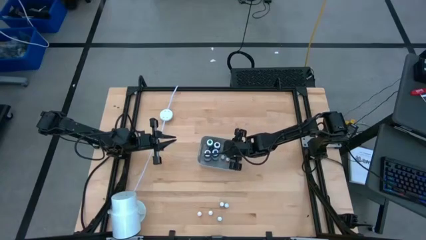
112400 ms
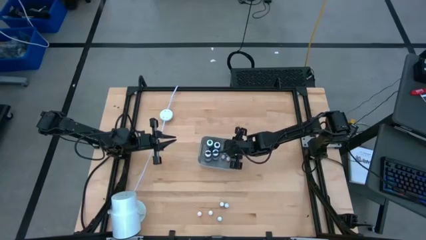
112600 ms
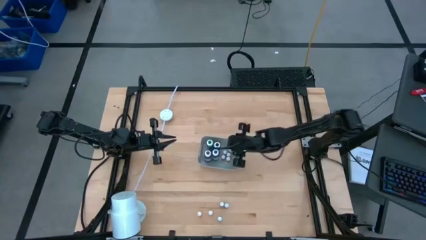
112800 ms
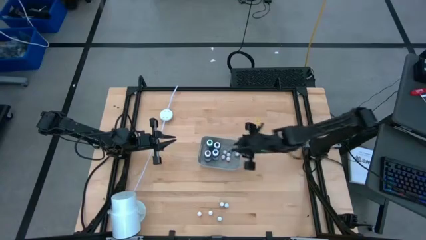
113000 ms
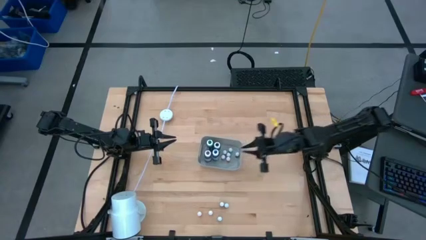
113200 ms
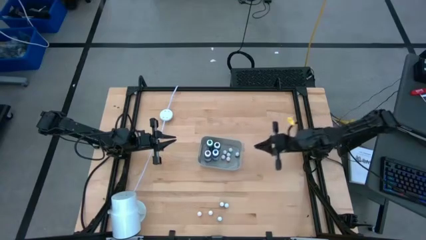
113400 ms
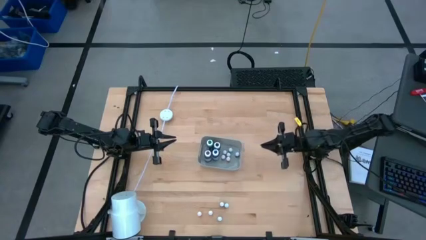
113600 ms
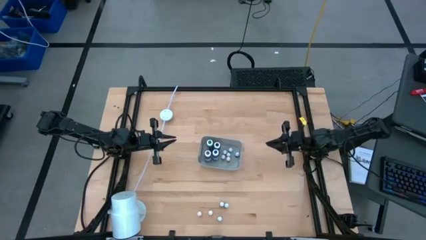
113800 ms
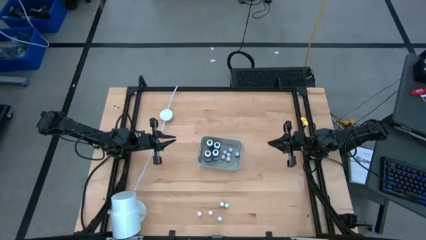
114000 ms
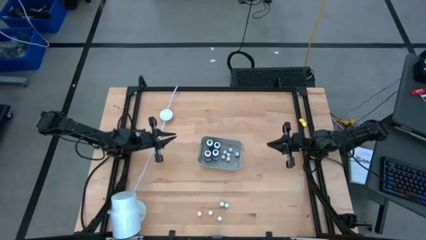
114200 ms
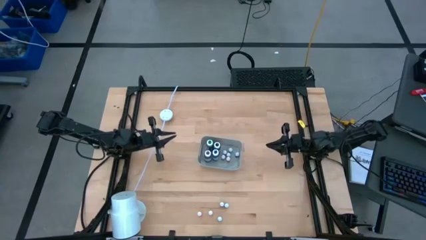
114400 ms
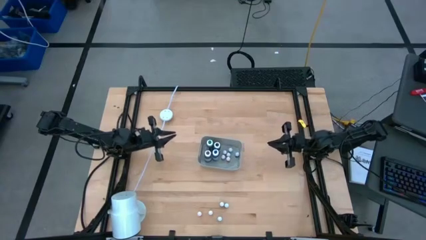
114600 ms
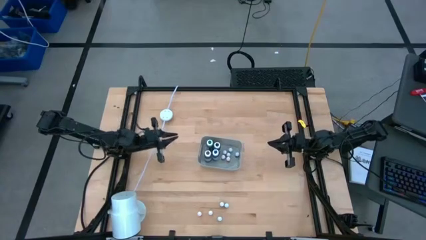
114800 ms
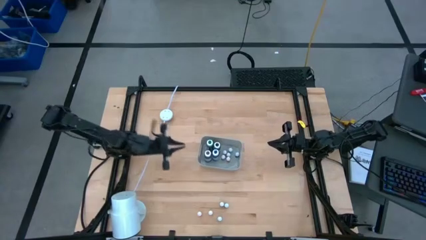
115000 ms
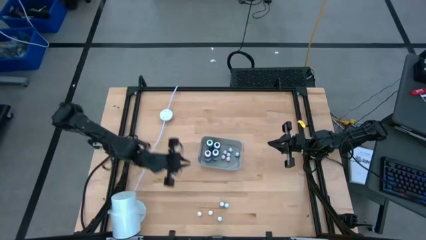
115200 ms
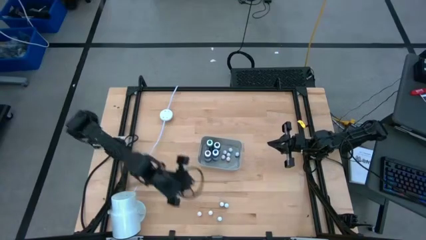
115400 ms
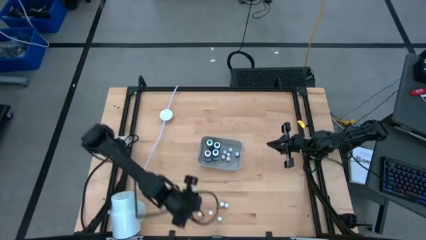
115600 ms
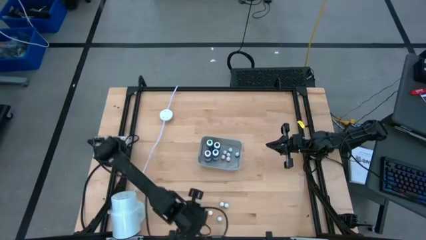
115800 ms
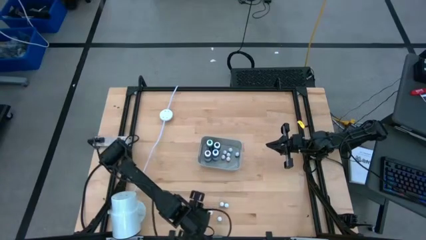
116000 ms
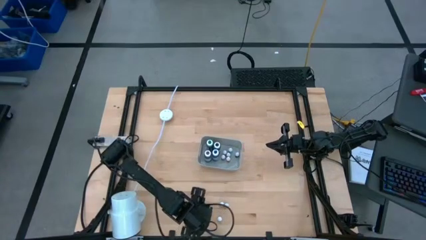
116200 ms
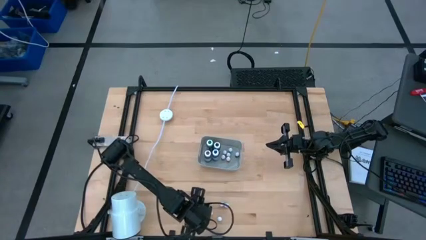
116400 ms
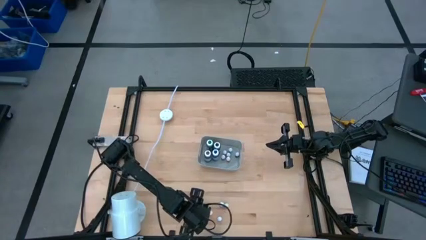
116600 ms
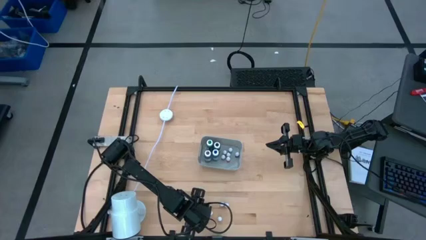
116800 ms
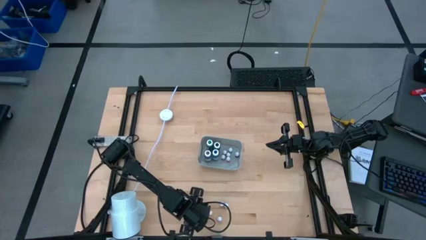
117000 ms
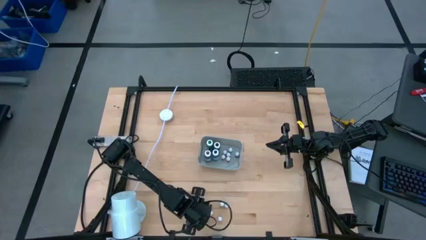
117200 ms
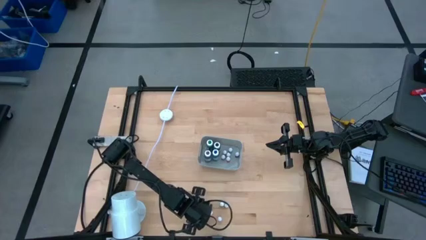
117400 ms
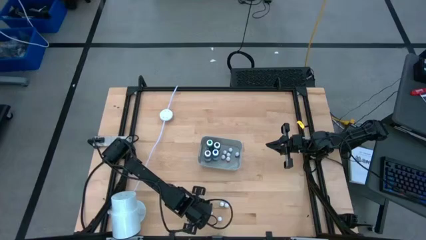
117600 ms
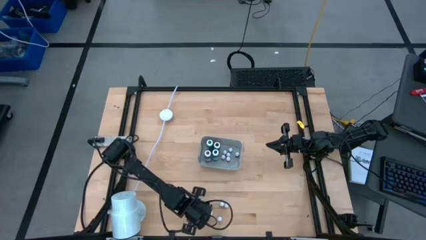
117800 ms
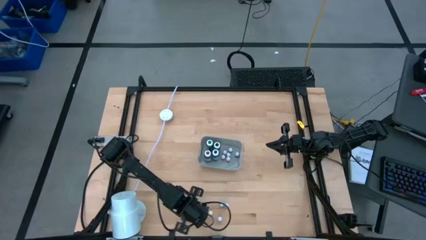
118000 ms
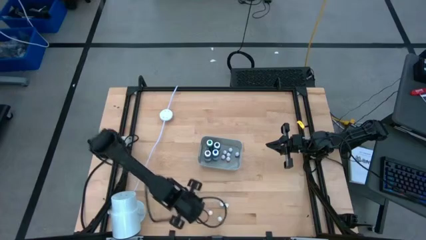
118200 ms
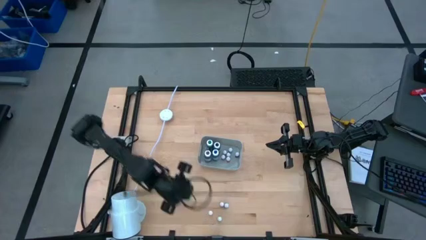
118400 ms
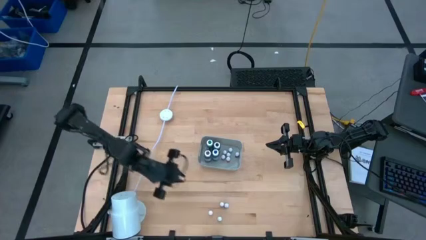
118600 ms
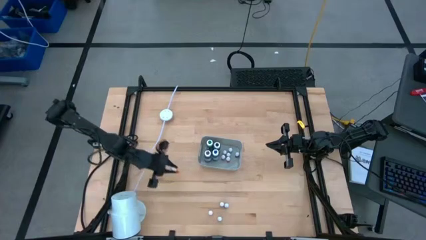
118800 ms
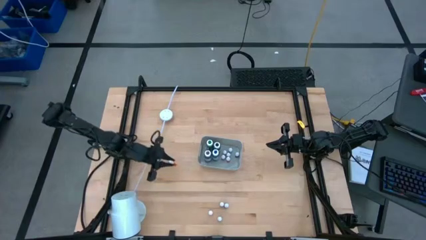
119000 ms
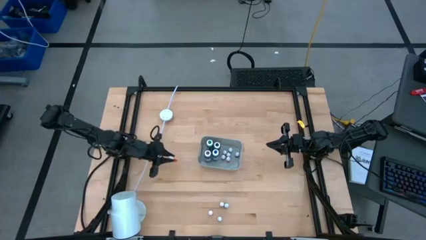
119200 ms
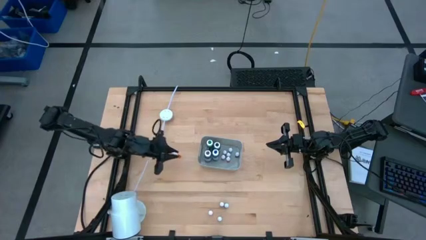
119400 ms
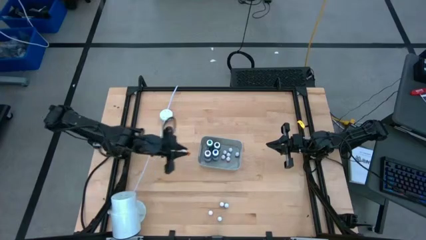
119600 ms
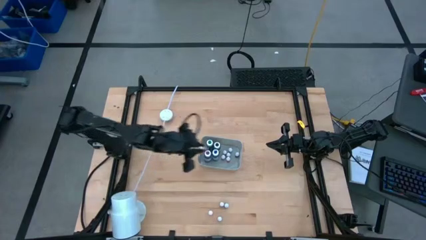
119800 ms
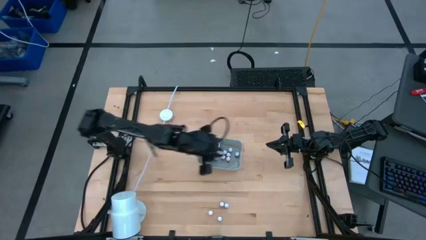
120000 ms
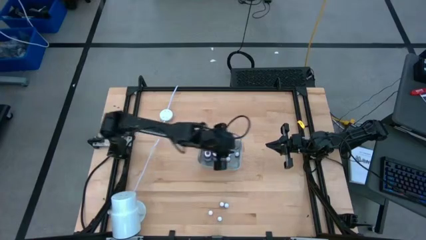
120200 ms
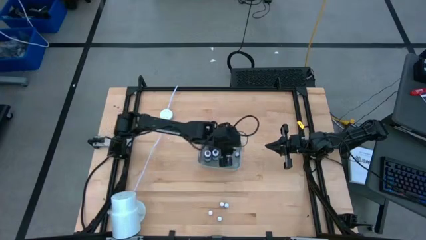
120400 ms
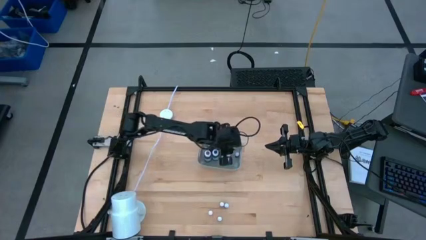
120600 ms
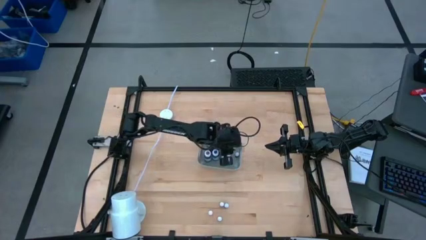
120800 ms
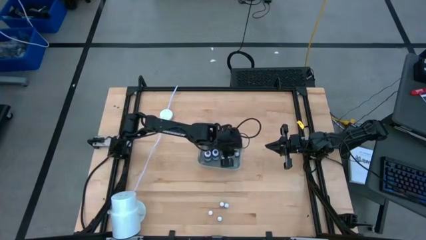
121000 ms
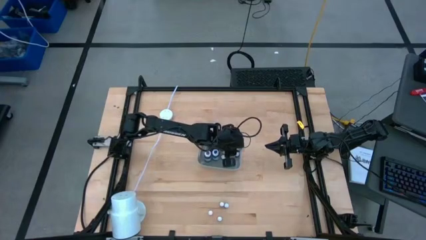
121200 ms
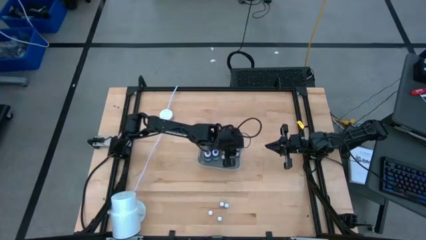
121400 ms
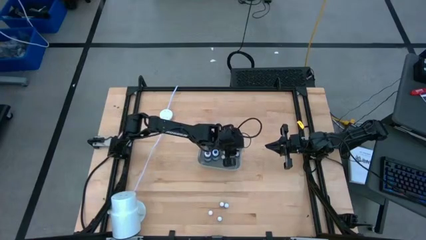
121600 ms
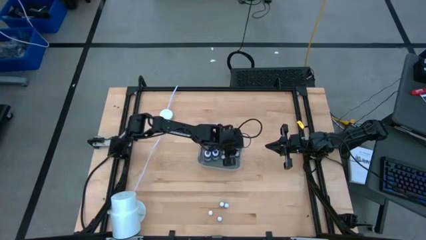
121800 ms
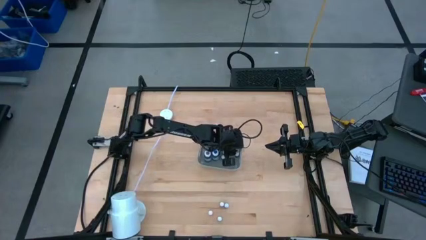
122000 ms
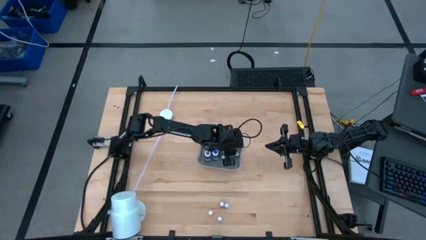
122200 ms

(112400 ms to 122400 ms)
Task: Pick & Place food coloring
Put the small orange food coloring bottle into the gray container

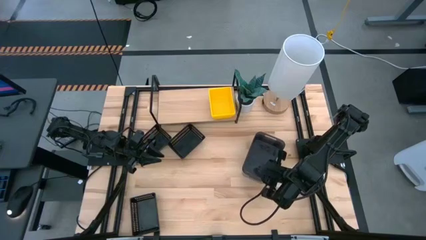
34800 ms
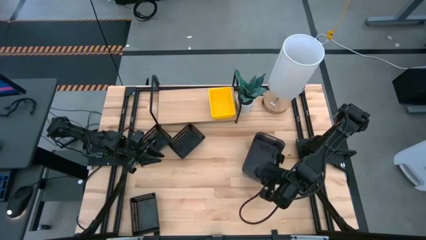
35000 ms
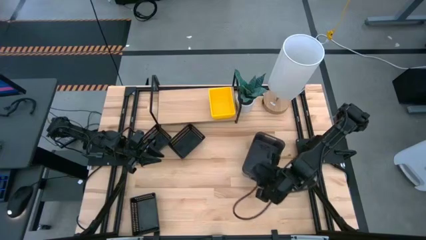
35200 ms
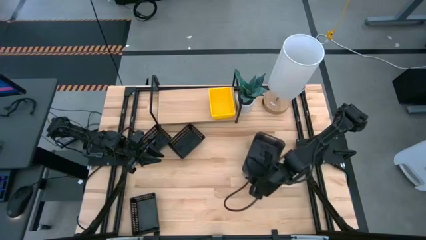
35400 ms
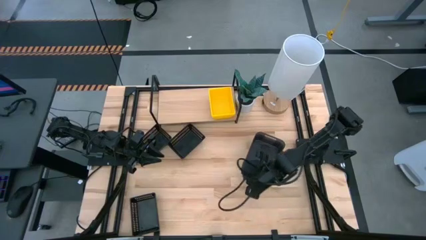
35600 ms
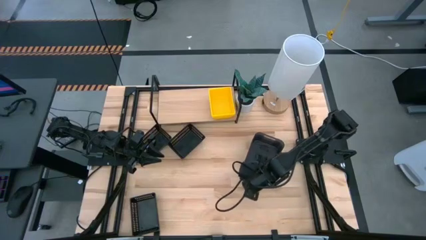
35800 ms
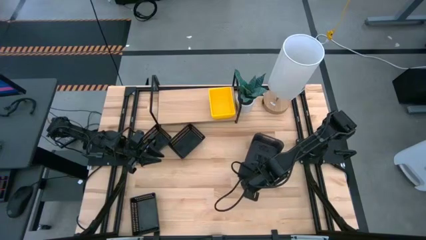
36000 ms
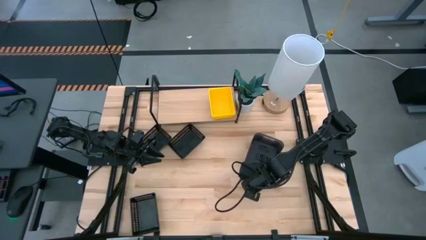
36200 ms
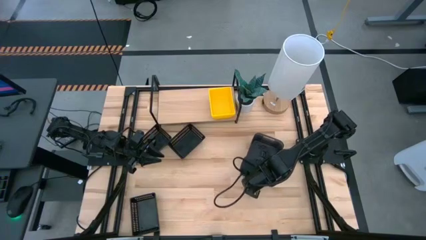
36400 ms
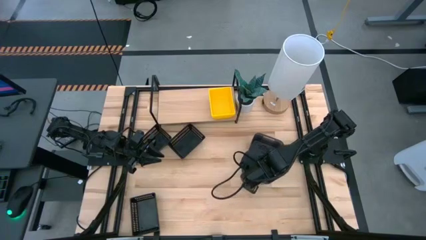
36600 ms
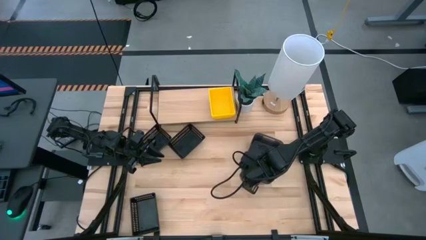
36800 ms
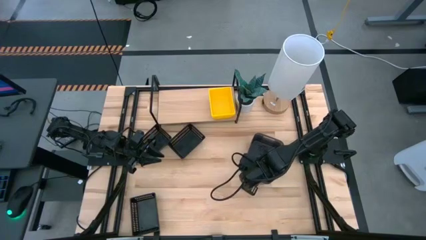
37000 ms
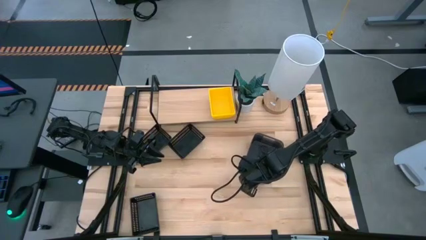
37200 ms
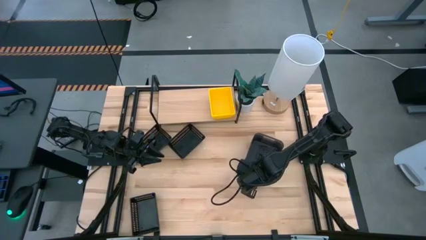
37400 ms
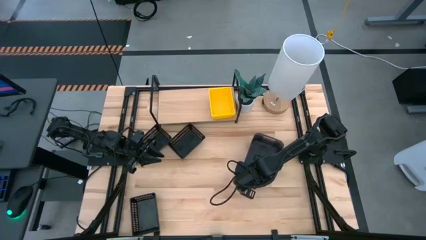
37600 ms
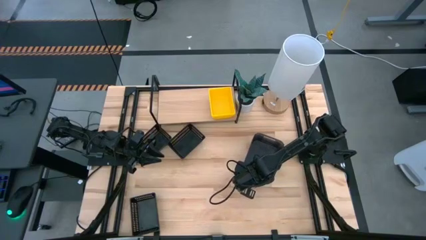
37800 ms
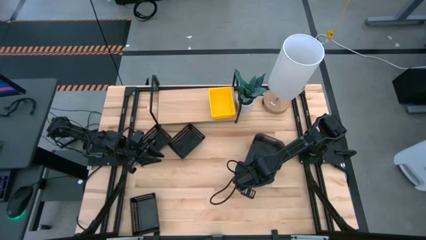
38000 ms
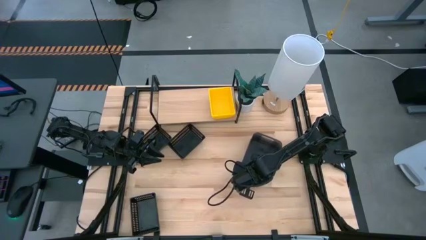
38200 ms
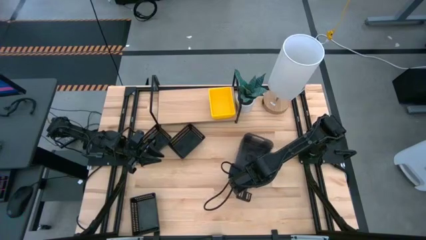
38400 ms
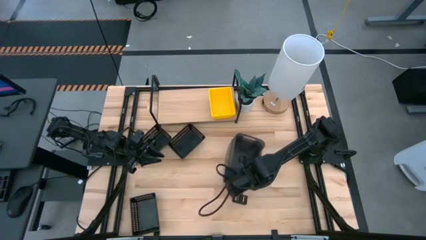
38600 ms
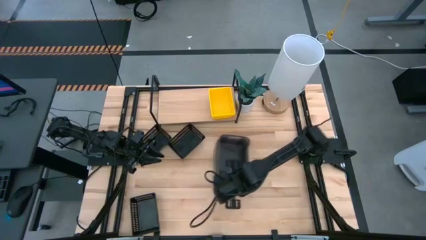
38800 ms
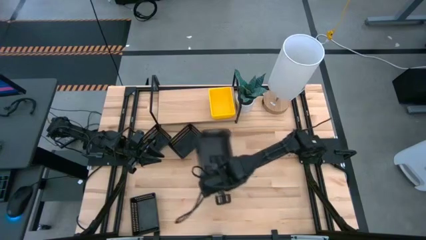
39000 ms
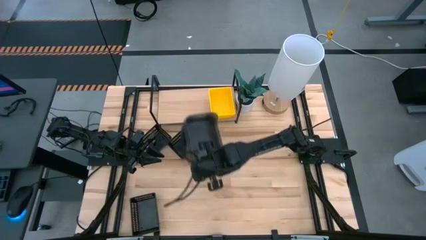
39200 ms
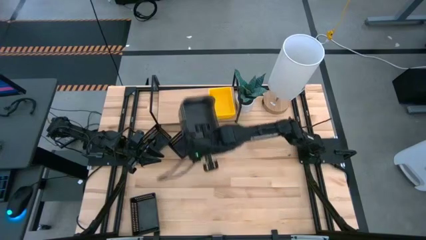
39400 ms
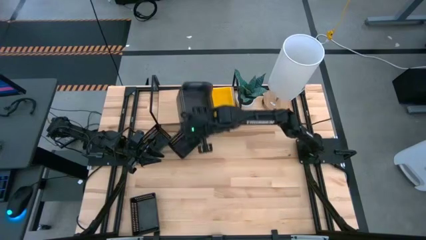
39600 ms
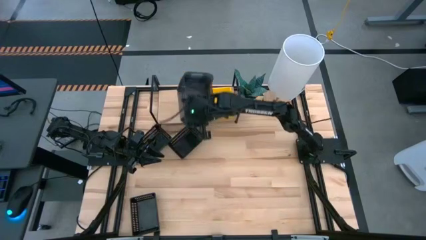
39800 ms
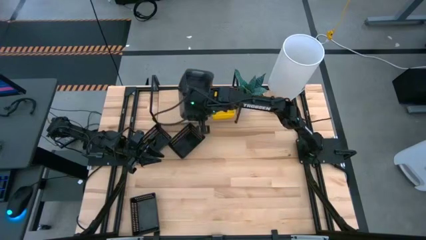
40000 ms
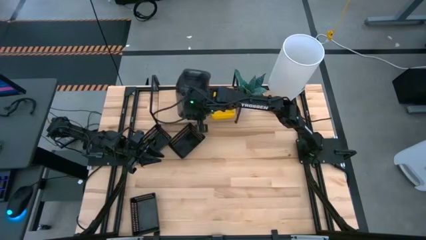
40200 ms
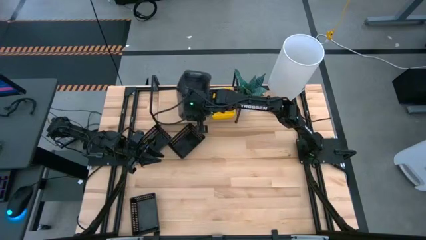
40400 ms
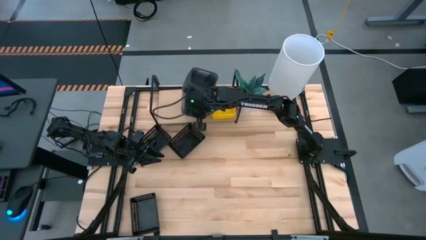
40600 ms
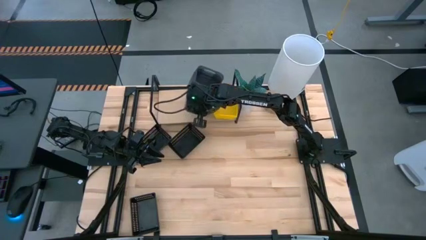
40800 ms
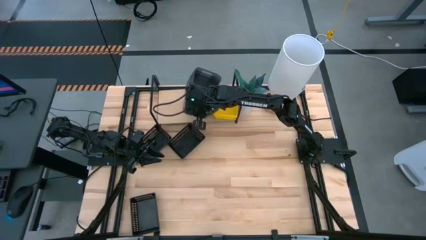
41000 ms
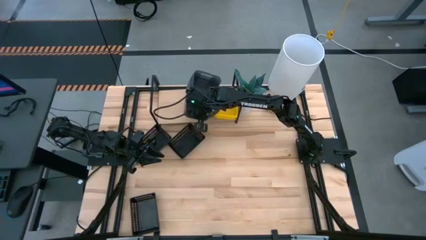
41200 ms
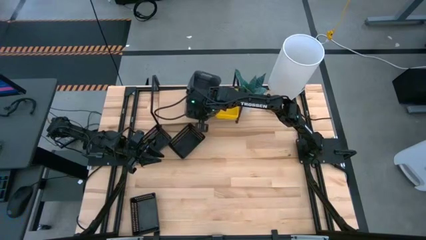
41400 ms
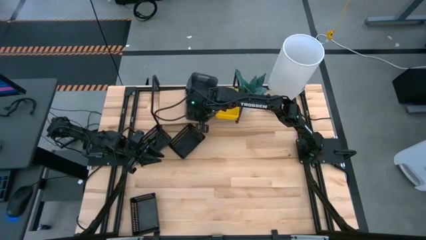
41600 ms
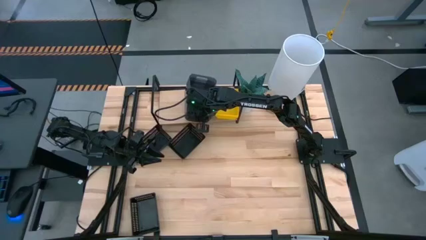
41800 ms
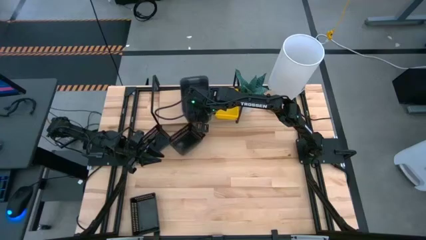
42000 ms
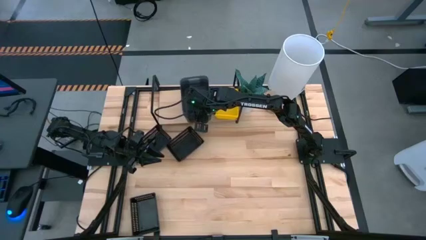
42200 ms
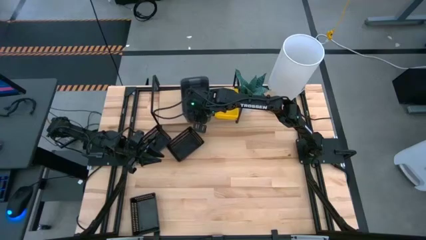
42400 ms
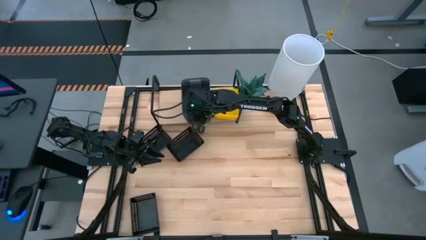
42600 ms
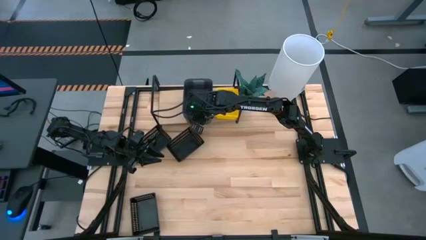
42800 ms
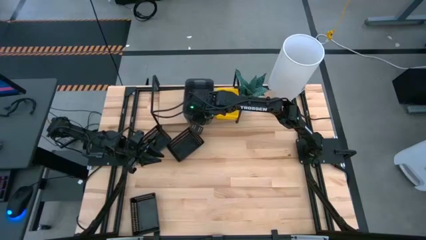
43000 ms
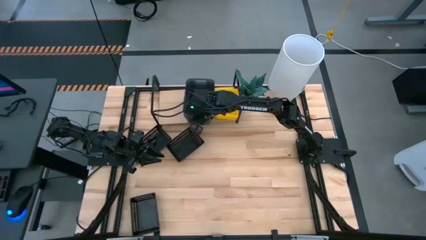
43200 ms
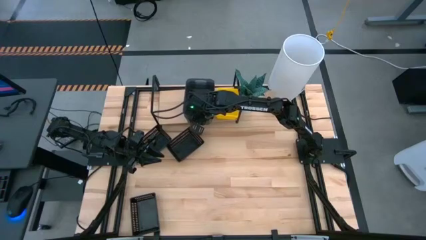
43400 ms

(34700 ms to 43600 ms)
Task: Stack baskets on shelf by color
Put the stack of transparent black bins on the shelf
